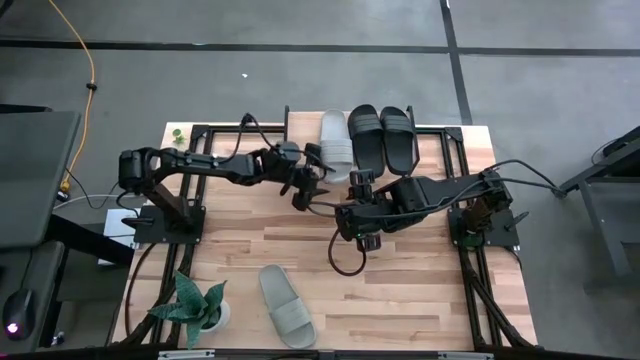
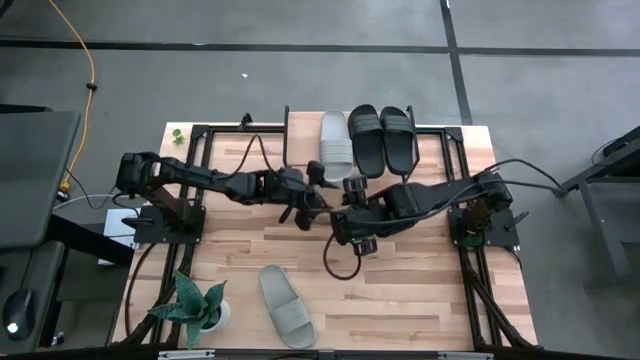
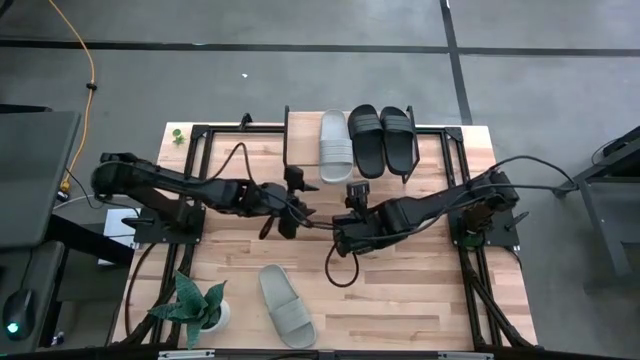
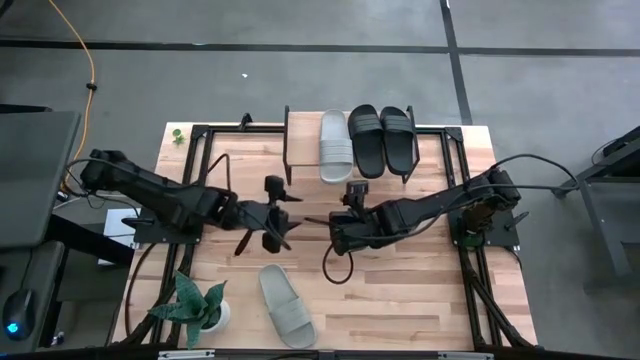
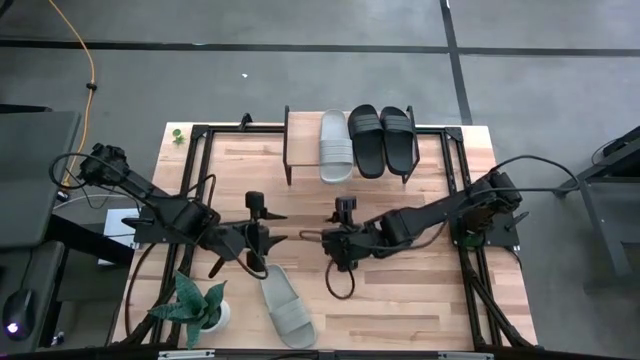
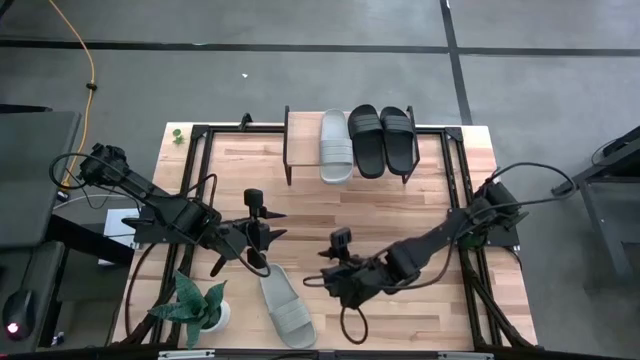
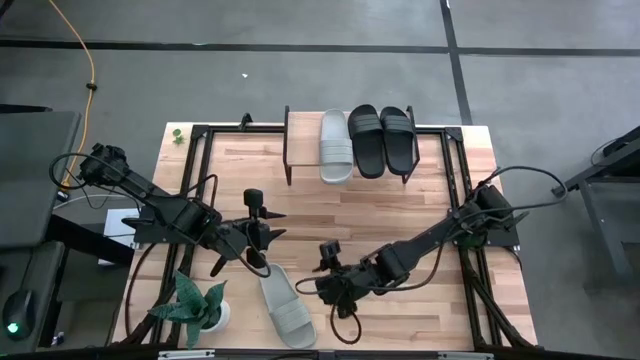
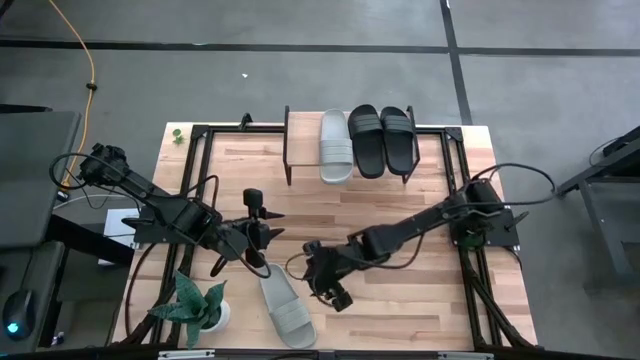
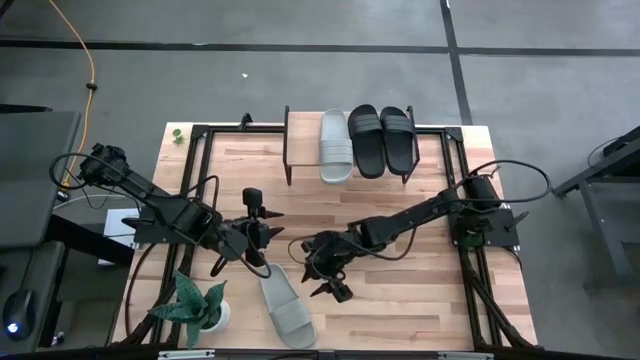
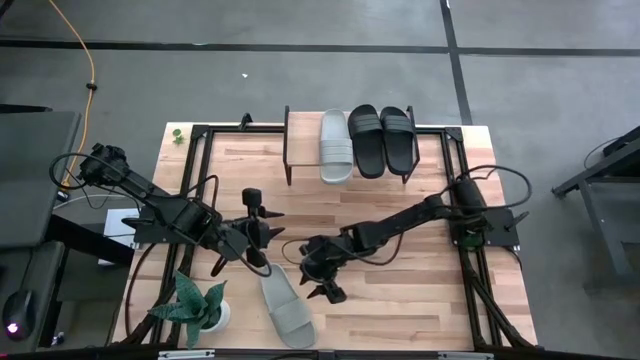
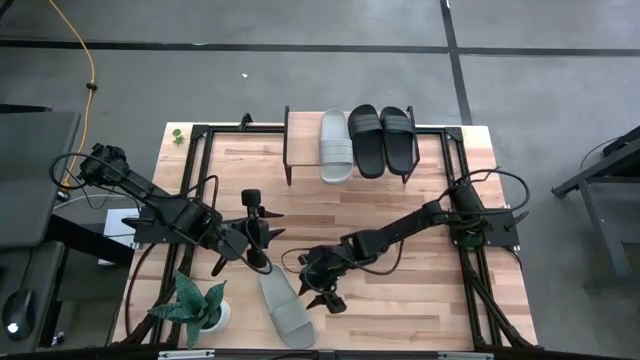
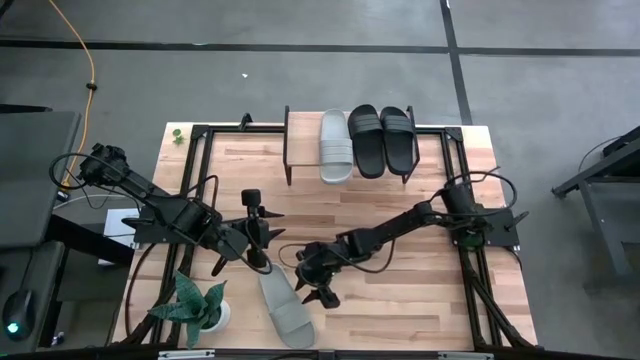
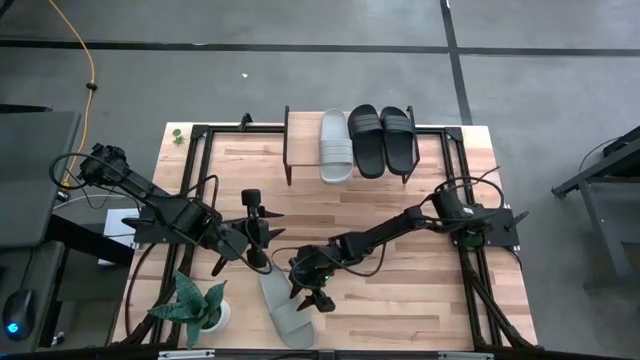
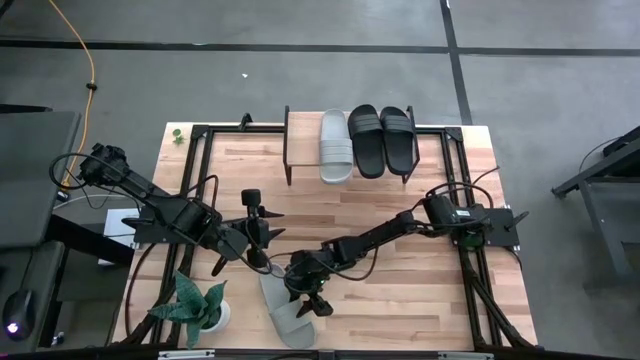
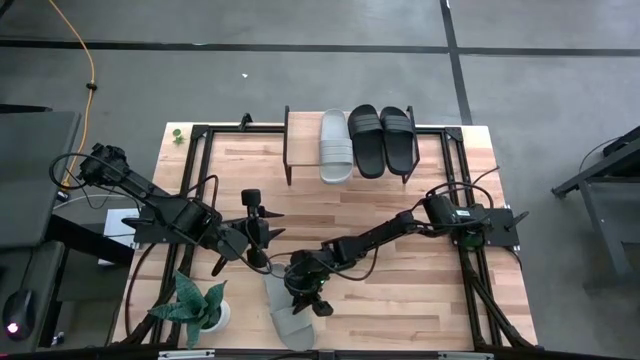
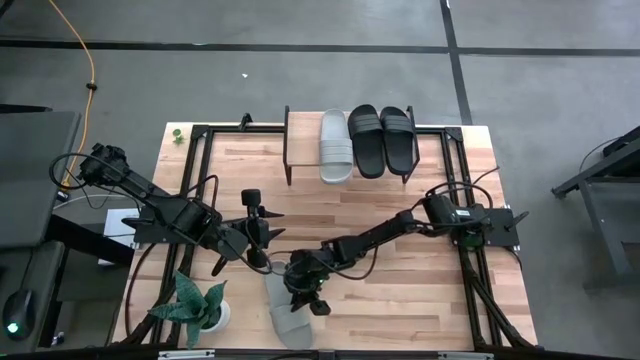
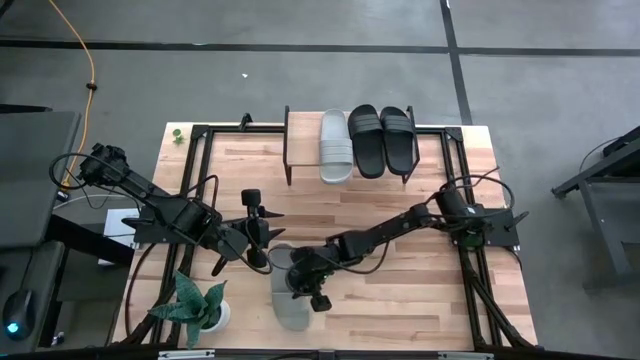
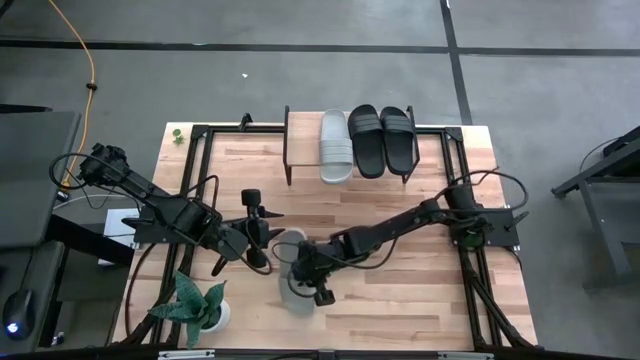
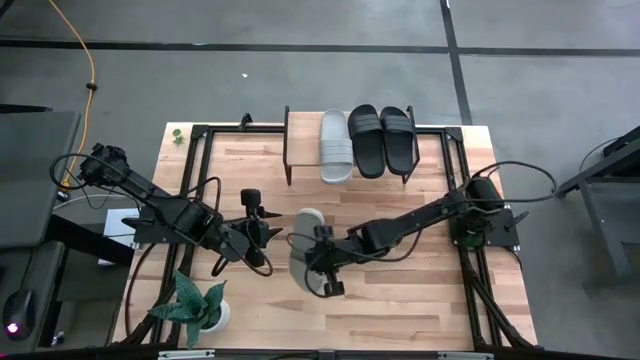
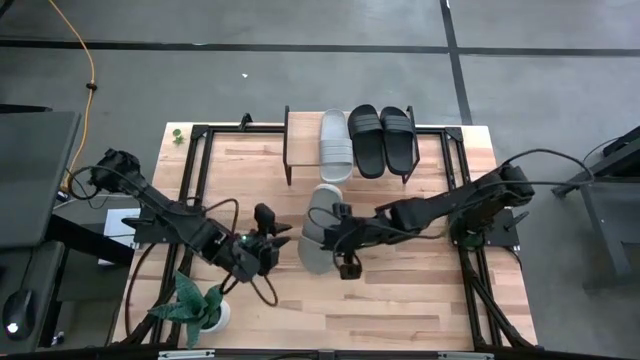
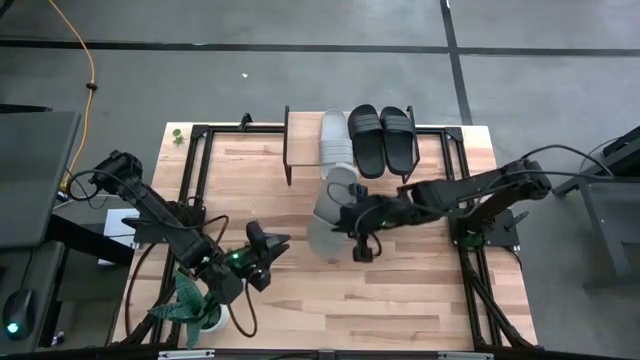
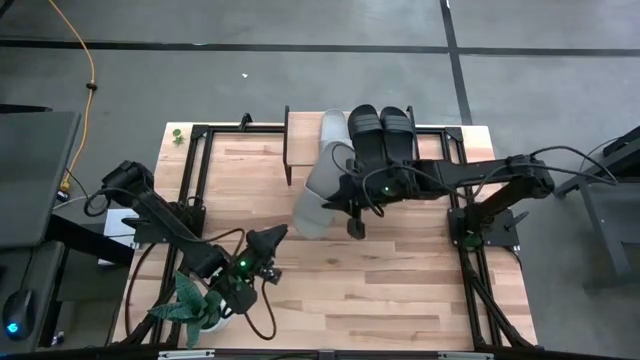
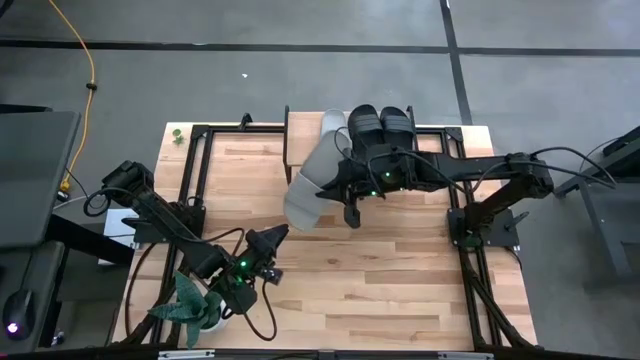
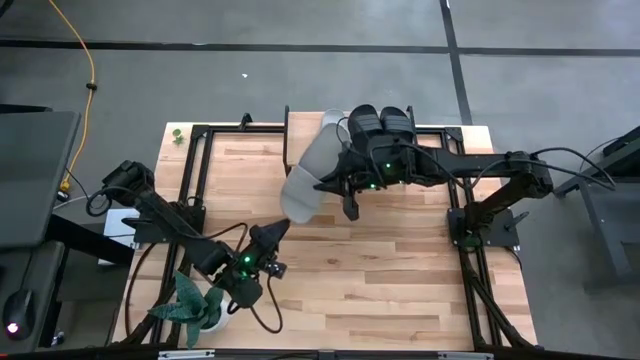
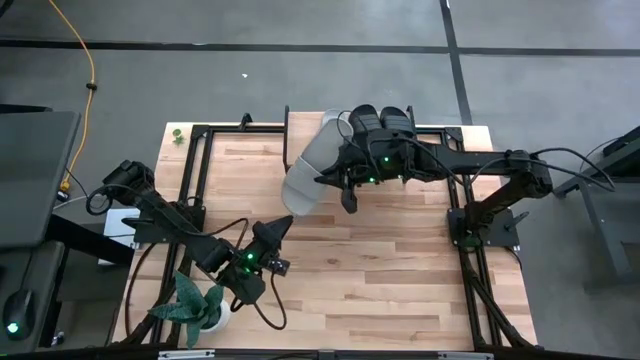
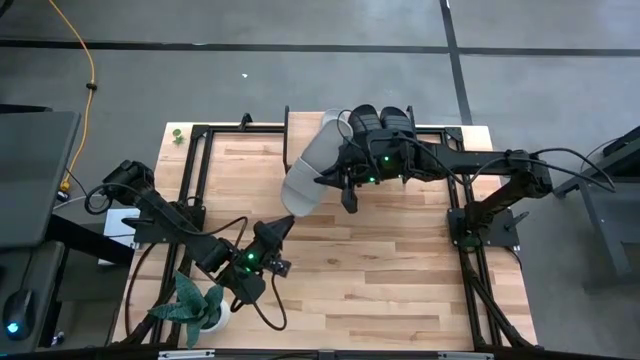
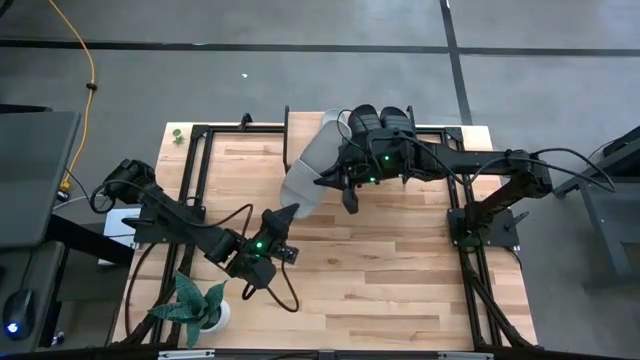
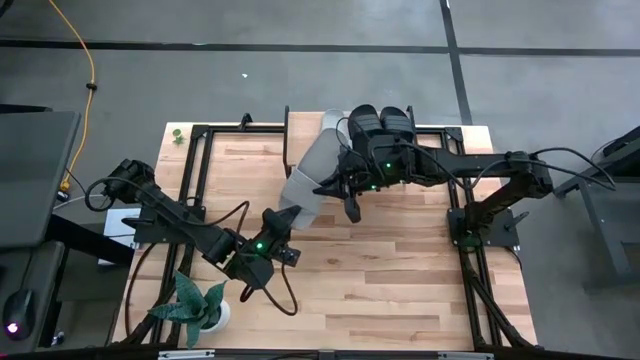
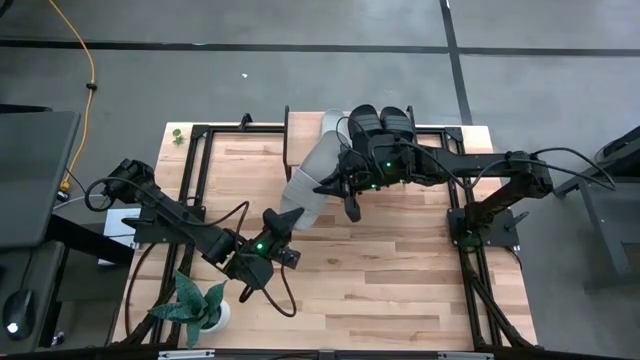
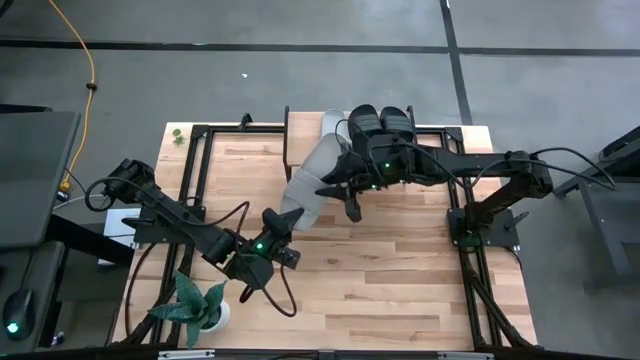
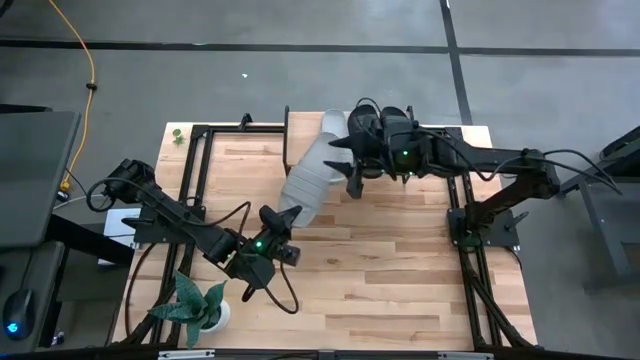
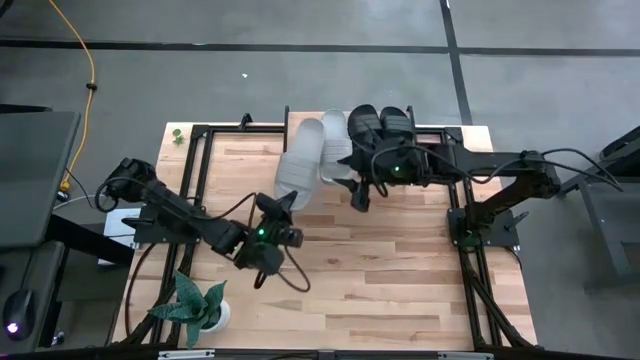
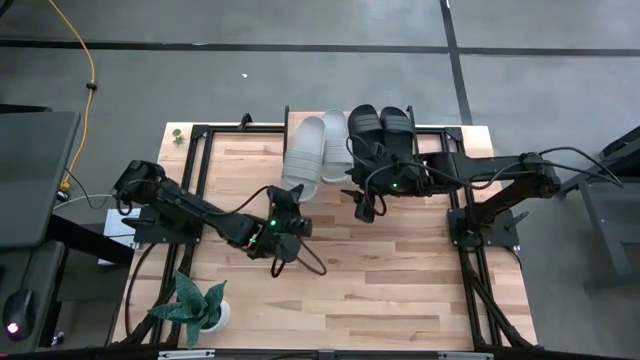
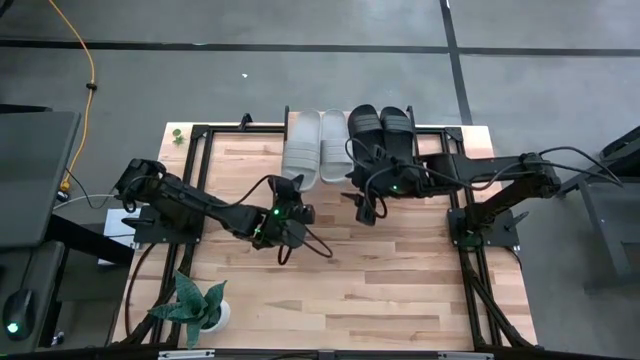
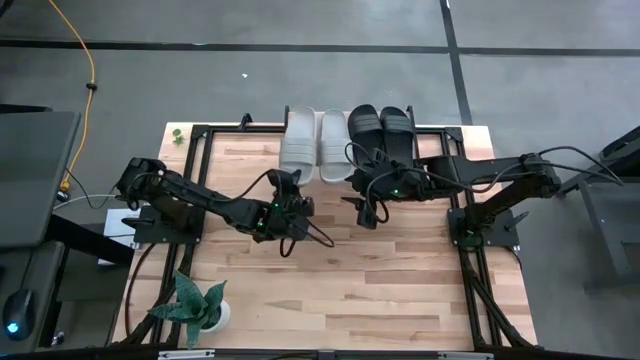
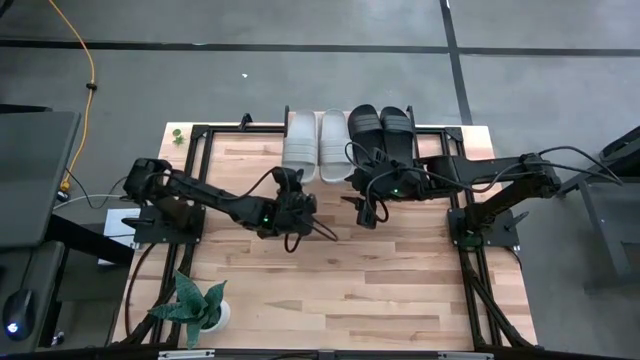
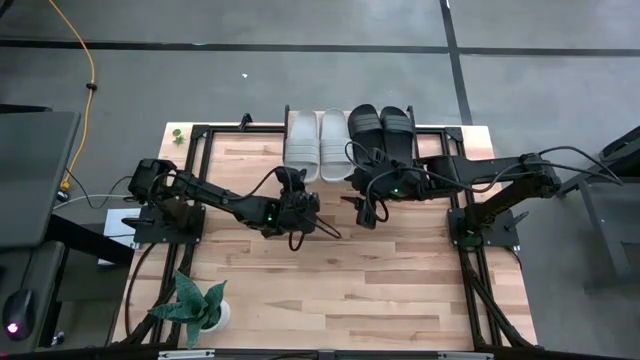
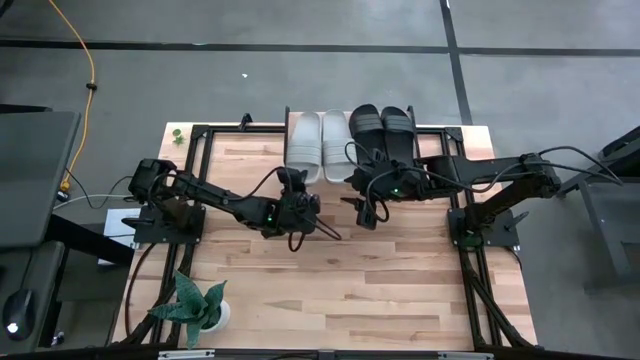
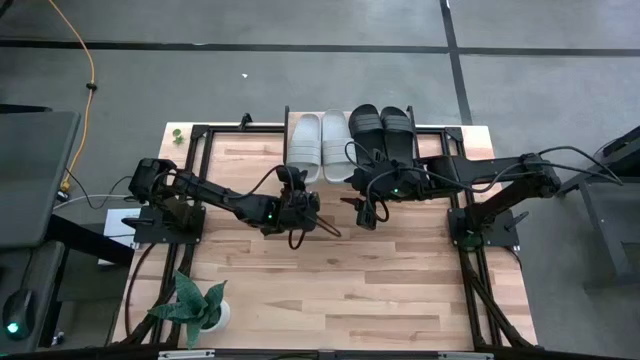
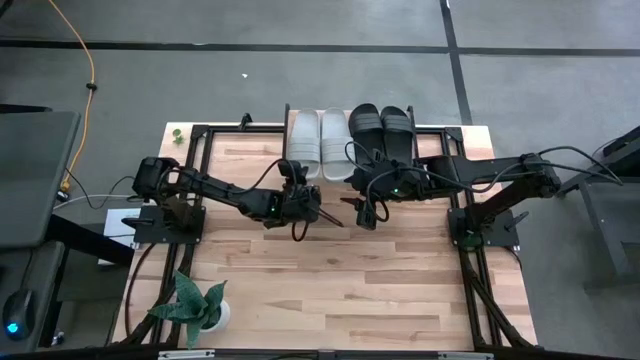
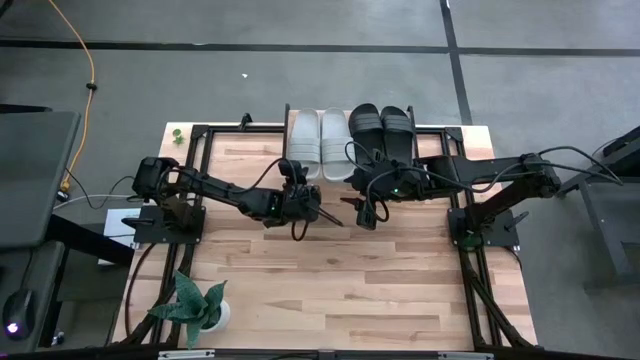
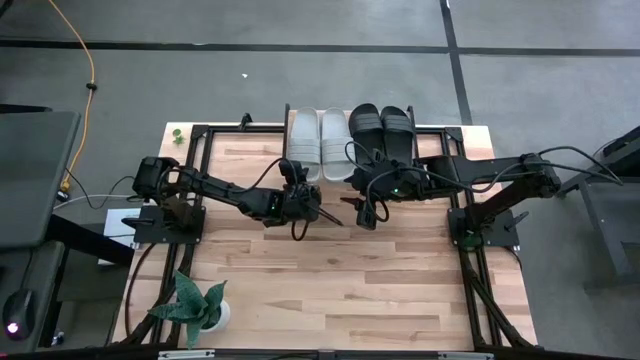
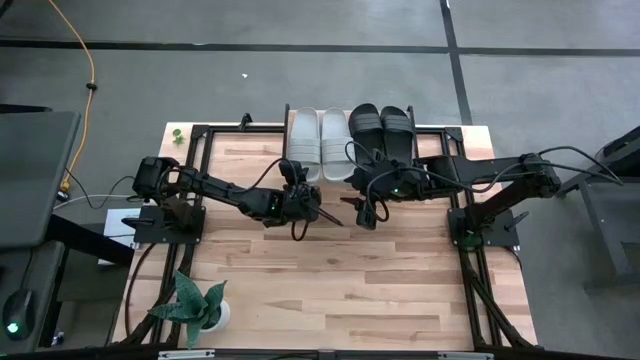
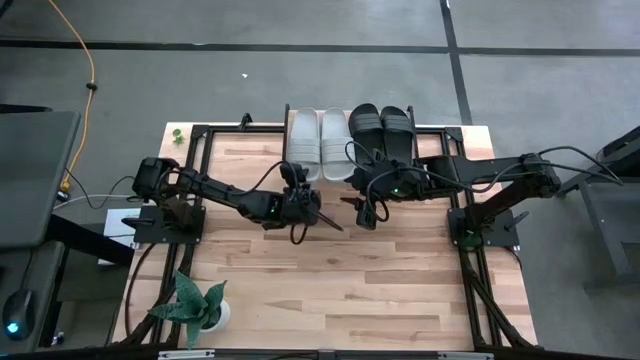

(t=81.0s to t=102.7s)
Task: Pick and place slides into the shelf
Put the gray slide on the shelf
